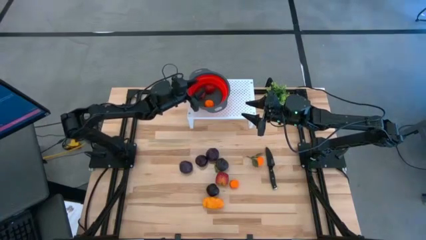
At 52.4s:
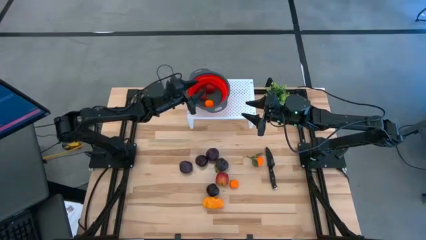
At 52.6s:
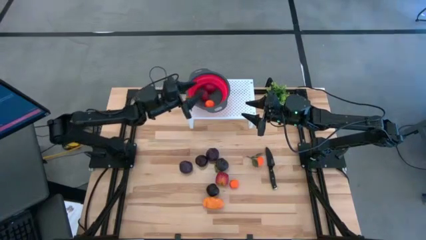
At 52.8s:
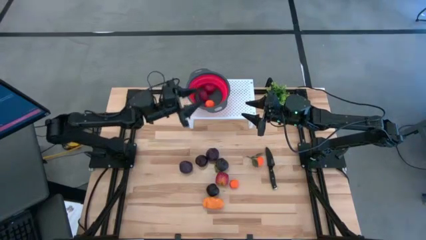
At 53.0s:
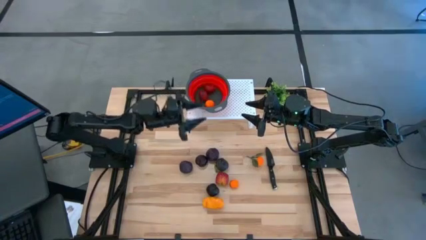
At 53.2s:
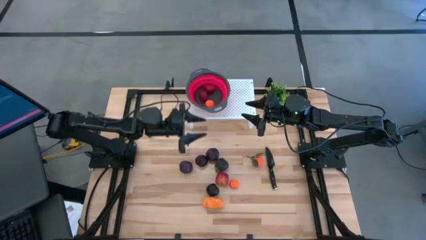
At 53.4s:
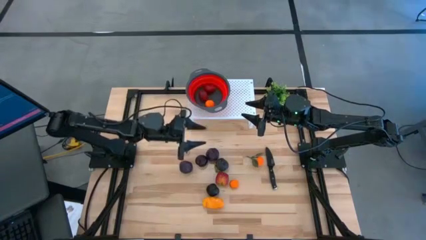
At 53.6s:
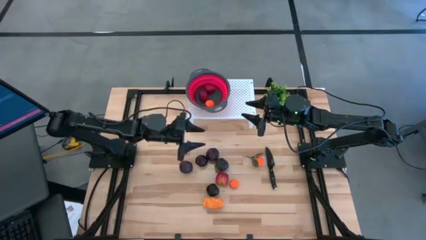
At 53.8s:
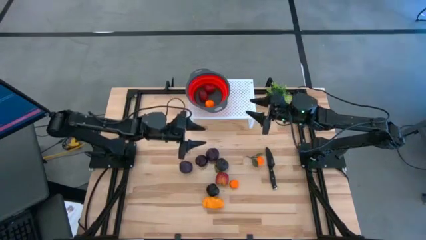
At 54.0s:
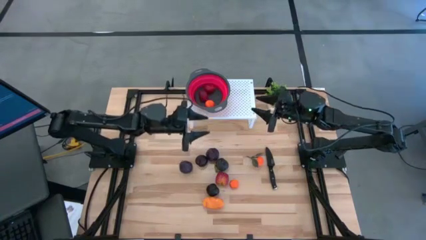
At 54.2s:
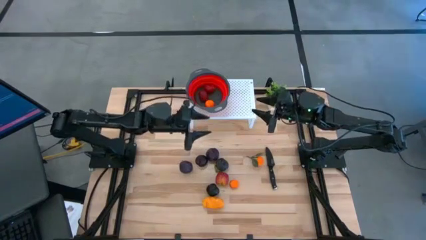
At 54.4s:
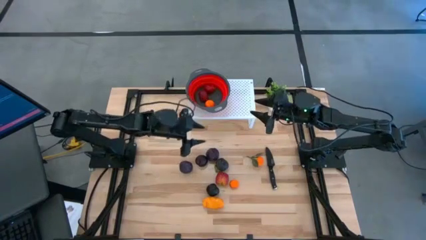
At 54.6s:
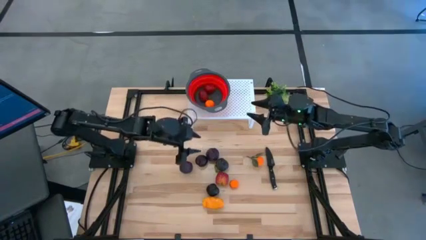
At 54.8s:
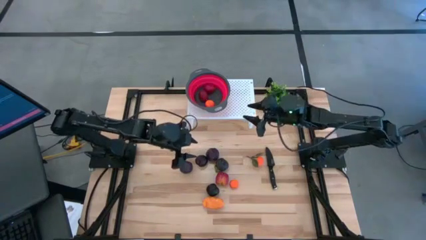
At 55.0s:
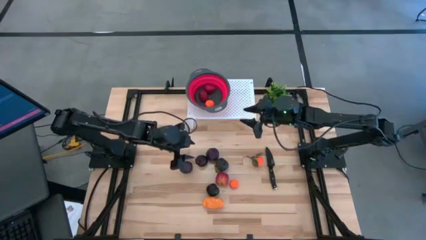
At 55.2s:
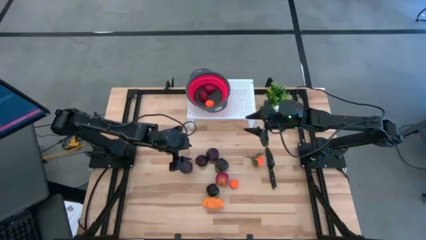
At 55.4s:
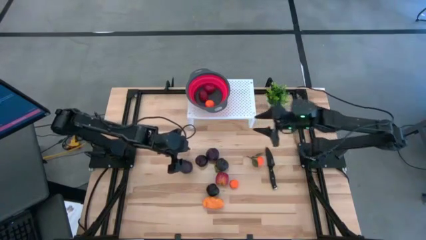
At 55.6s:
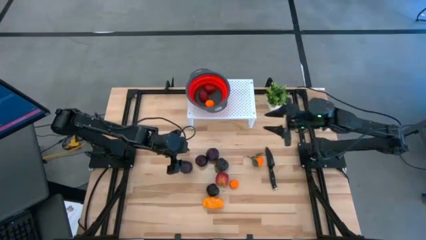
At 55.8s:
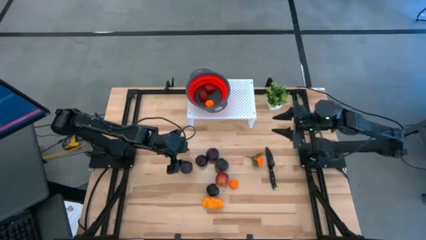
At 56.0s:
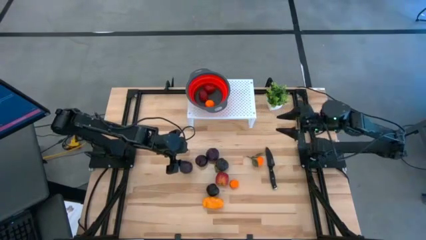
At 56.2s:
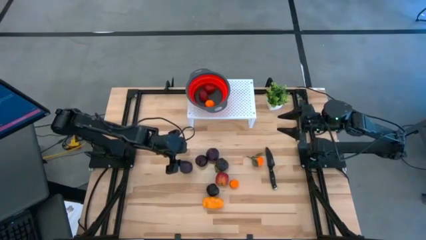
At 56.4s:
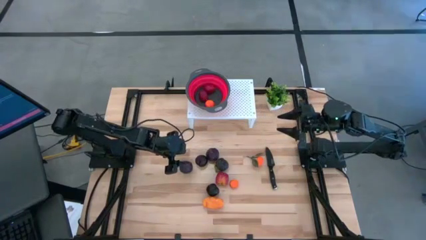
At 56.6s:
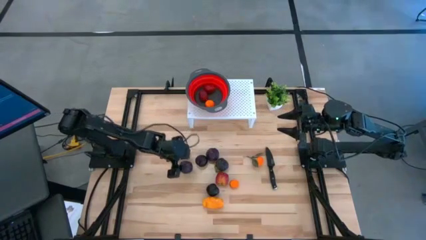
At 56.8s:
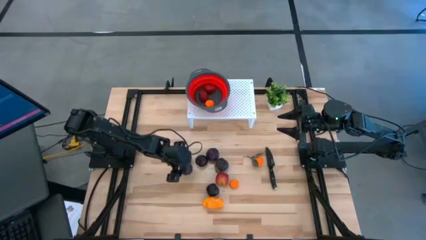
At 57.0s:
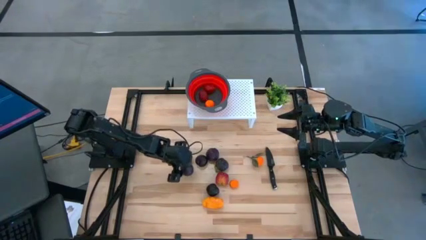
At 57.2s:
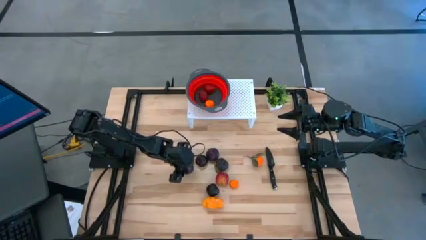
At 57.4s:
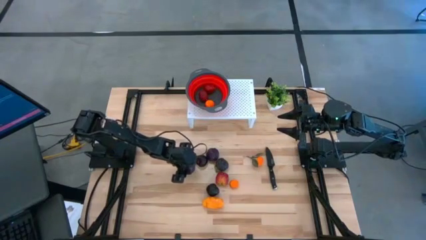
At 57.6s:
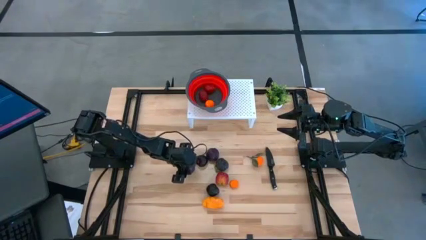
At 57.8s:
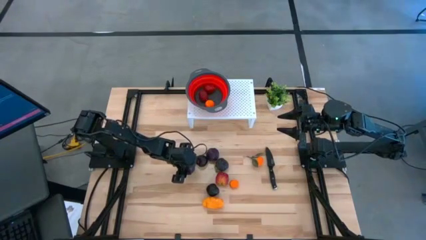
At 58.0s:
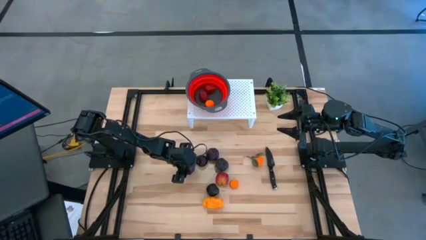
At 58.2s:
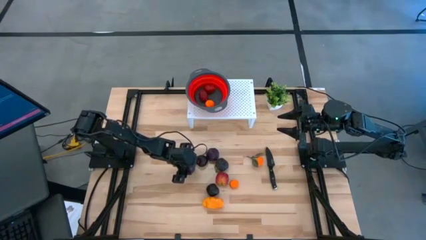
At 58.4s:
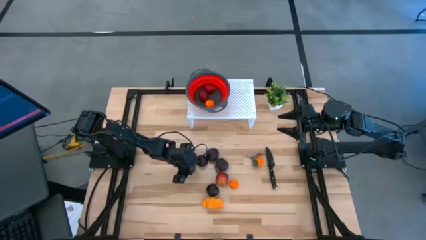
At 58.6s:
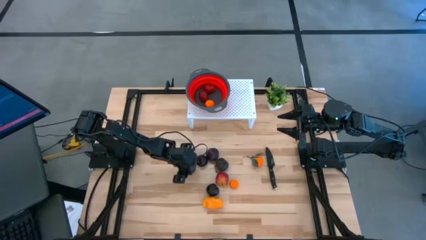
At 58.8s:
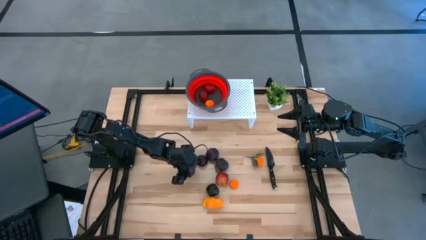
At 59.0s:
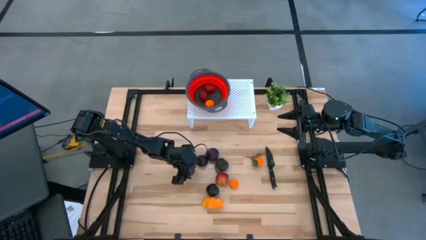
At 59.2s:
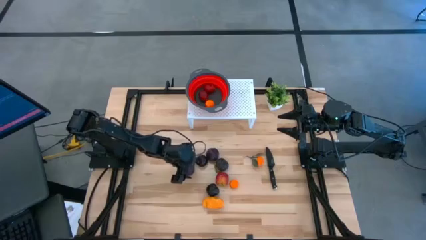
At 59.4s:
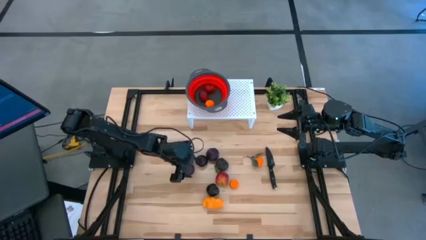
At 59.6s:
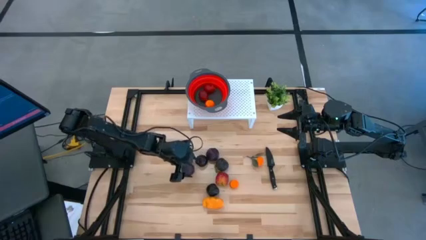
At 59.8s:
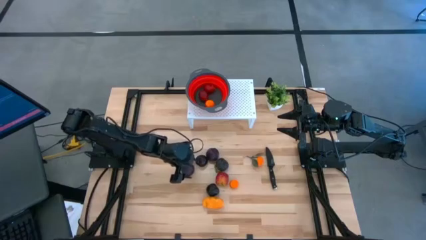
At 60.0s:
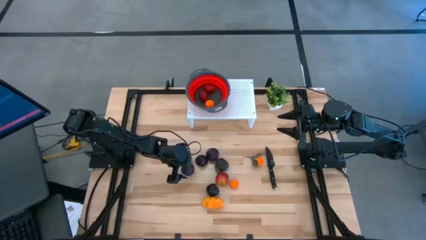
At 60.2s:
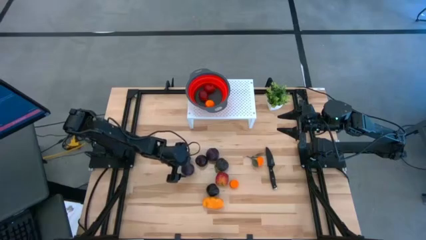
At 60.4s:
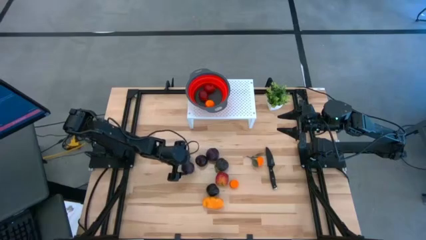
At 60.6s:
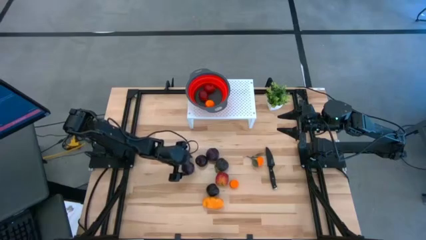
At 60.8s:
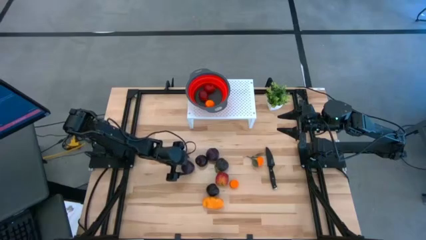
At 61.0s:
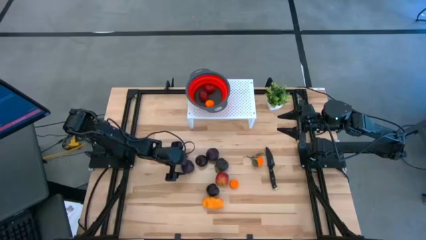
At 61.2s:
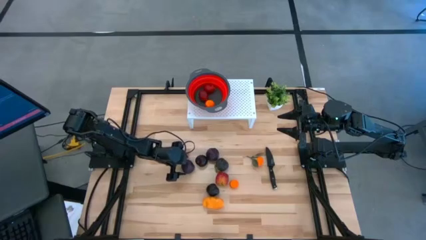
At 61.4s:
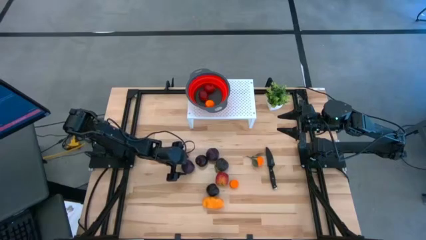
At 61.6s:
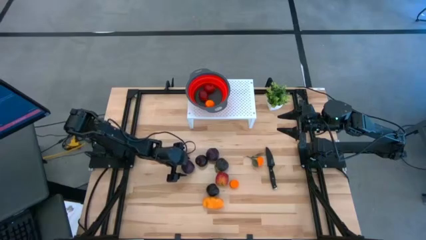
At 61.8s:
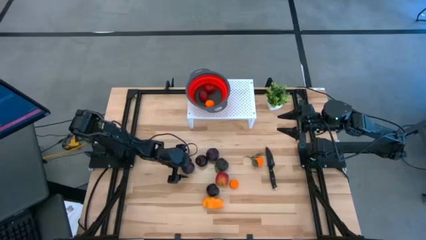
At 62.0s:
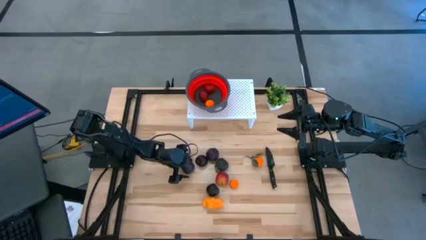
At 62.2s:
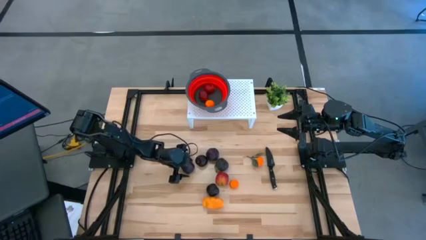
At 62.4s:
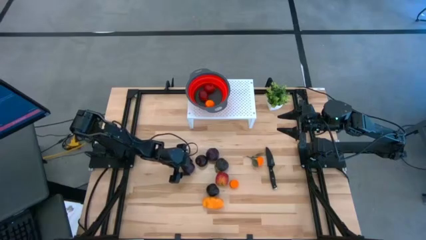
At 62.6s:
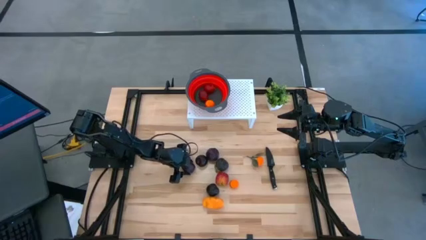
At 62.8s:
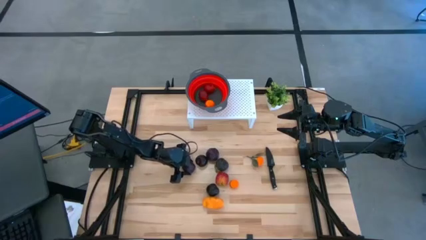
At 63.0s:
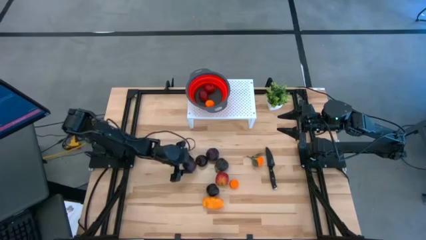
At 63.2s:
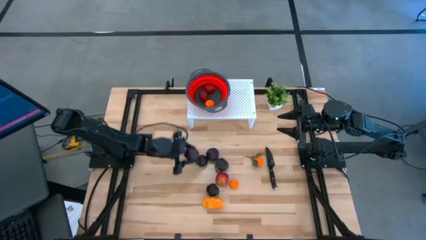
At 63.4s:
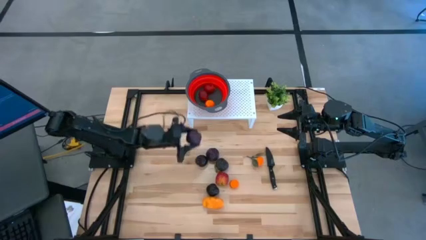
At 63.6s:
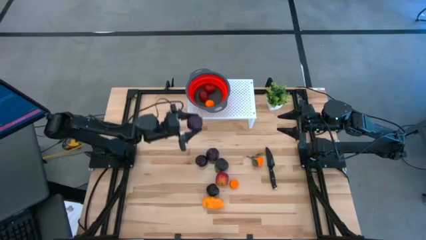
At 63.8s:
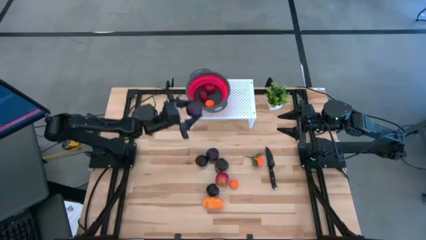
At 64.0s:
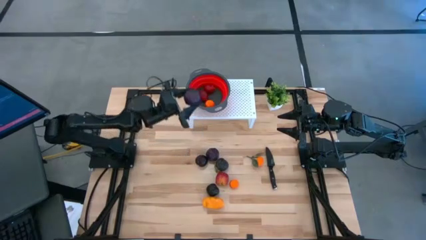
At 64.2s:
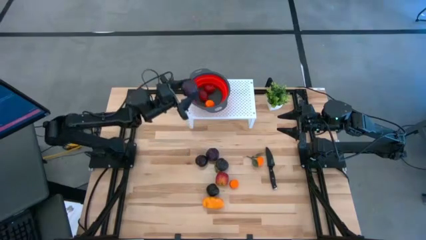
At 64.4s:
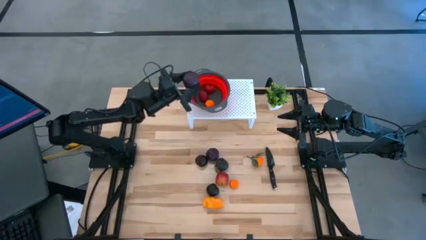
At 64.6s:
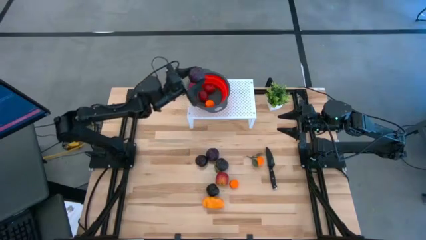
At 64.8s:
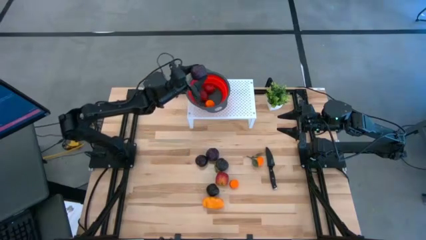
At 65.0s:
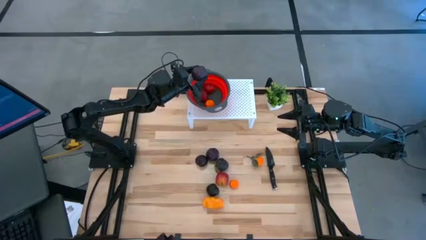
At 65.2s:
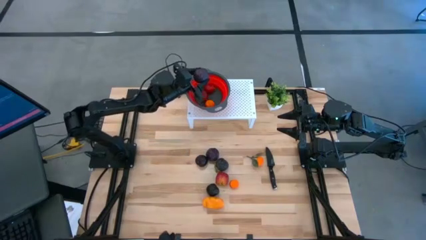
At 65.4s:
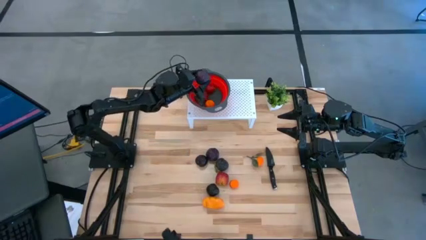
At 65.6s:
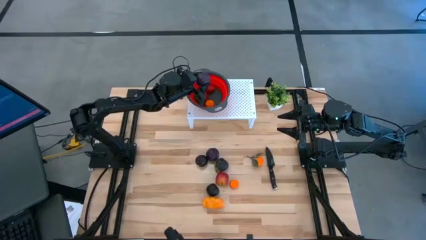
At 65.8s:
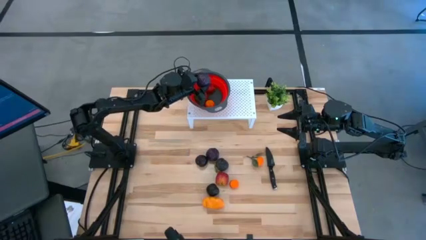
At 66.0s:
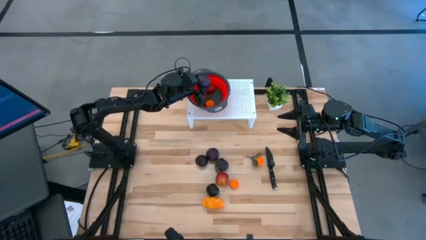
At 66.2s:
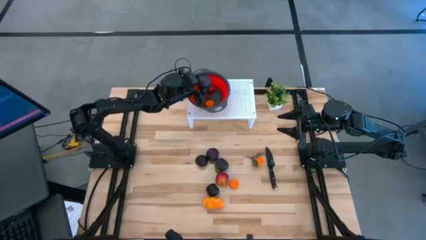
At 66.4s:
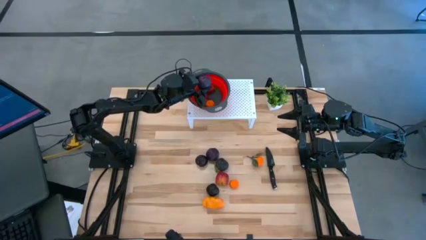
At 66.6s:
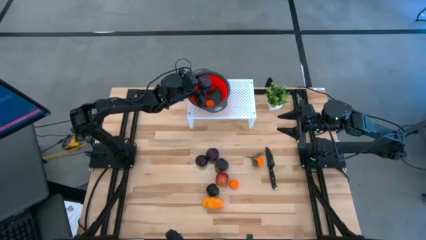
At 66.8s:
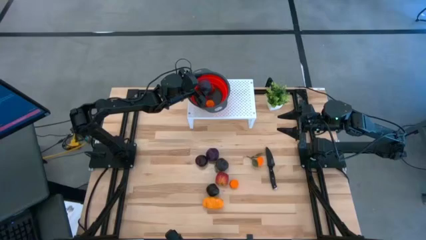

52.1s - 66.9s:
Task: Pick & Place Fruit
Put the plum into the strainer bowl on the shelf
